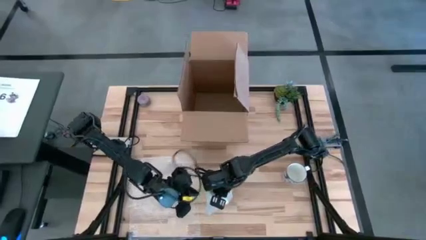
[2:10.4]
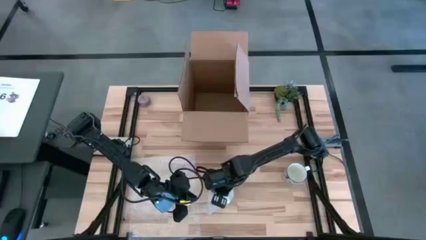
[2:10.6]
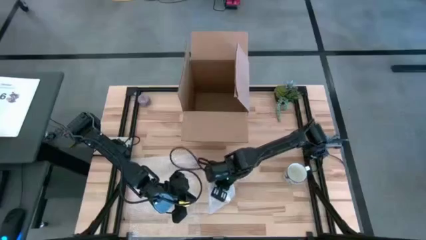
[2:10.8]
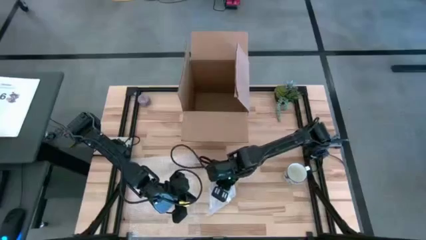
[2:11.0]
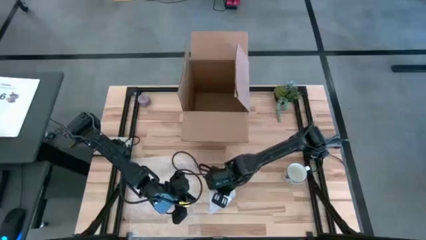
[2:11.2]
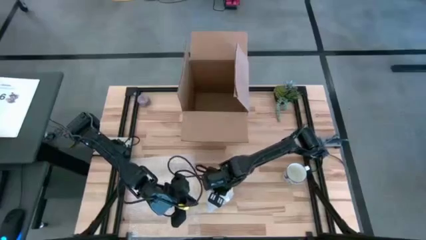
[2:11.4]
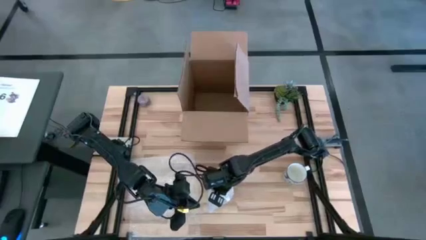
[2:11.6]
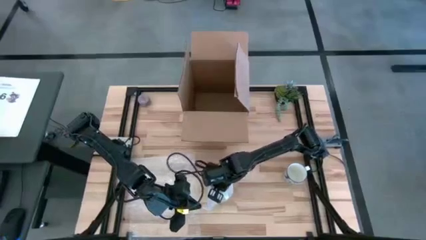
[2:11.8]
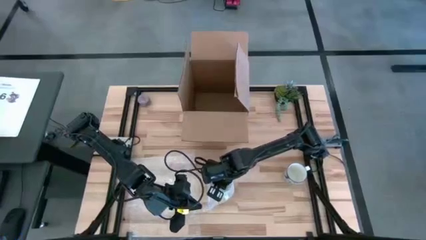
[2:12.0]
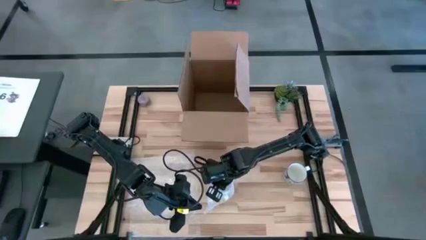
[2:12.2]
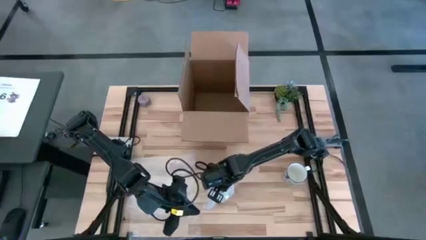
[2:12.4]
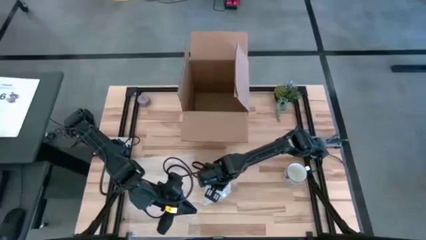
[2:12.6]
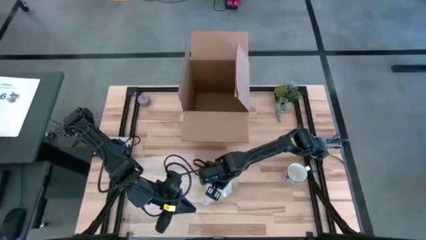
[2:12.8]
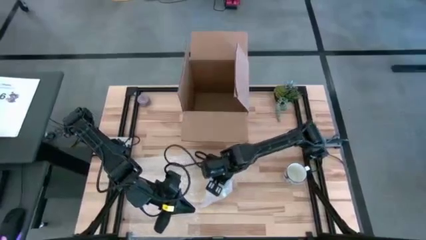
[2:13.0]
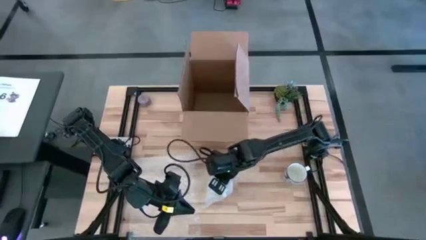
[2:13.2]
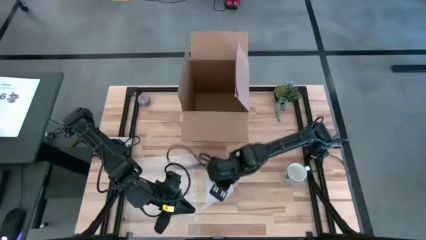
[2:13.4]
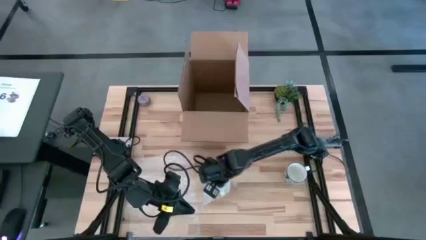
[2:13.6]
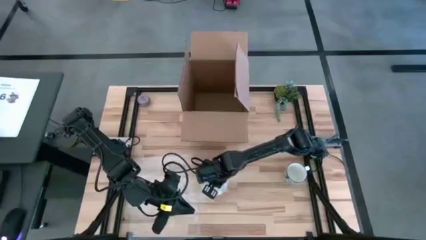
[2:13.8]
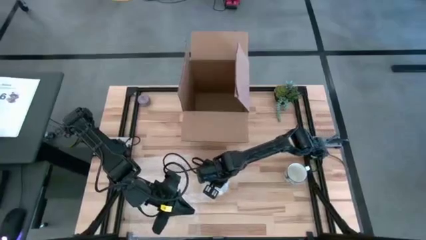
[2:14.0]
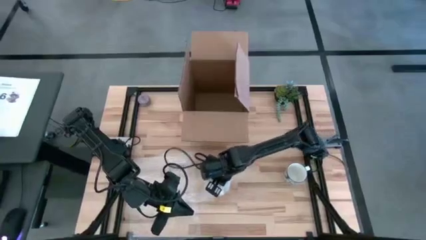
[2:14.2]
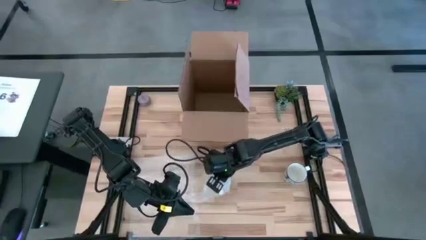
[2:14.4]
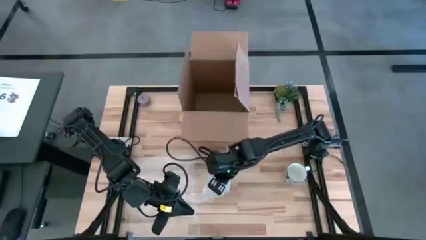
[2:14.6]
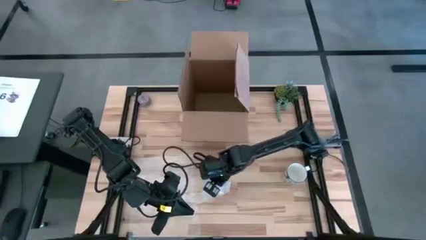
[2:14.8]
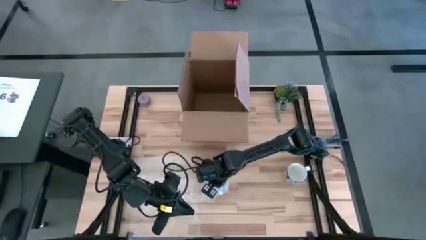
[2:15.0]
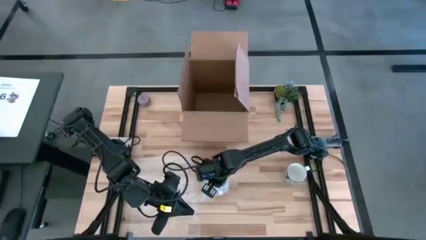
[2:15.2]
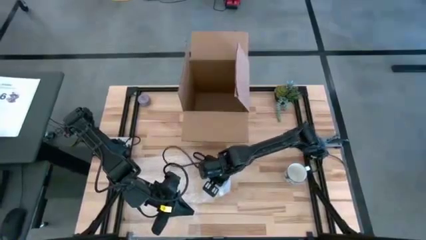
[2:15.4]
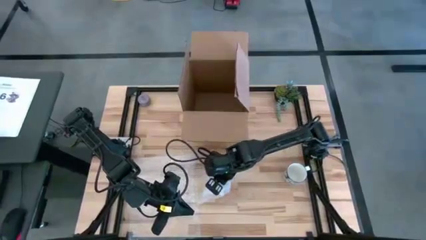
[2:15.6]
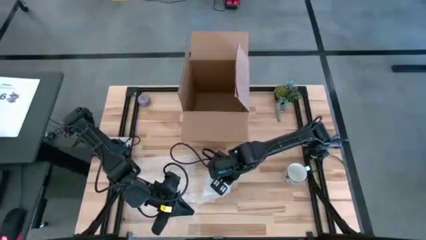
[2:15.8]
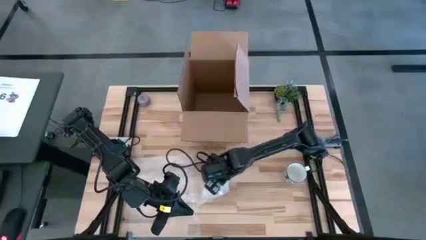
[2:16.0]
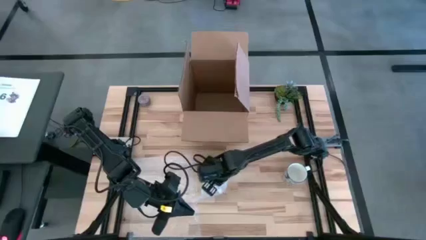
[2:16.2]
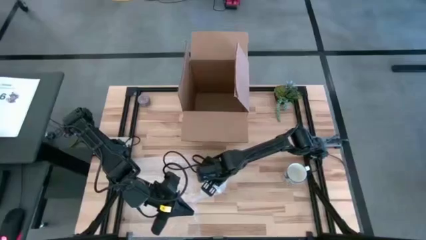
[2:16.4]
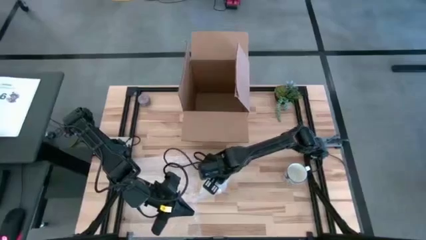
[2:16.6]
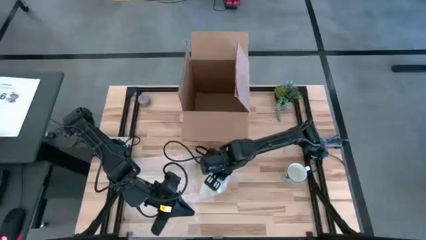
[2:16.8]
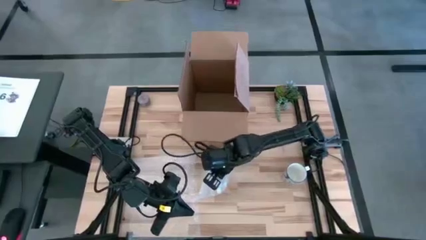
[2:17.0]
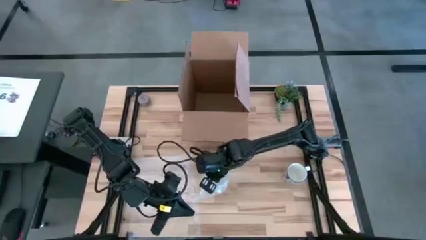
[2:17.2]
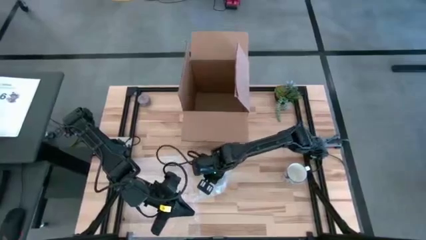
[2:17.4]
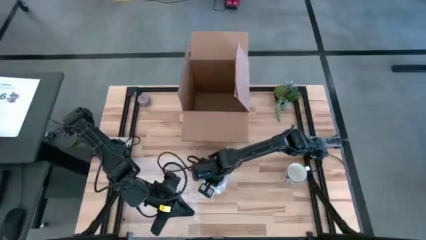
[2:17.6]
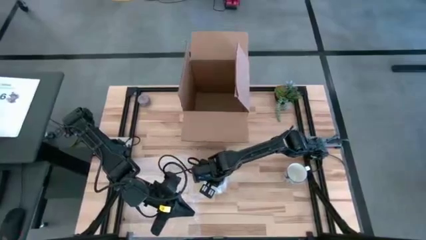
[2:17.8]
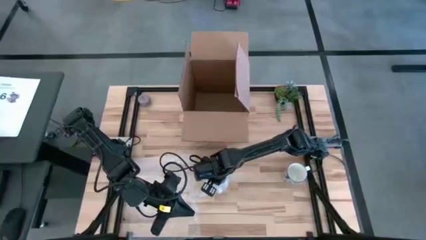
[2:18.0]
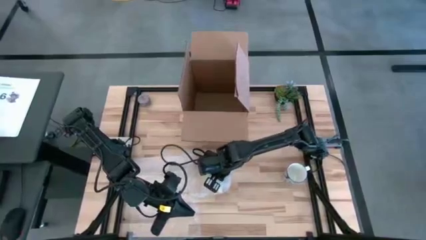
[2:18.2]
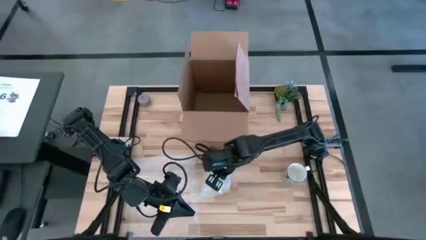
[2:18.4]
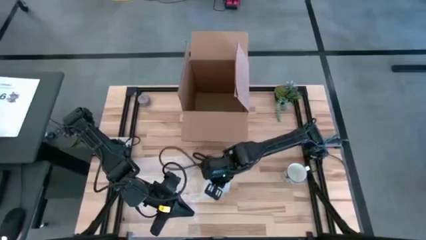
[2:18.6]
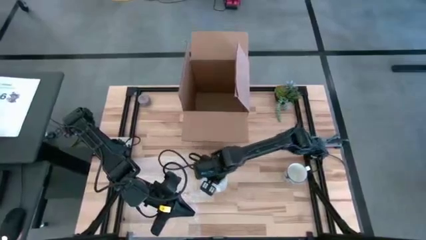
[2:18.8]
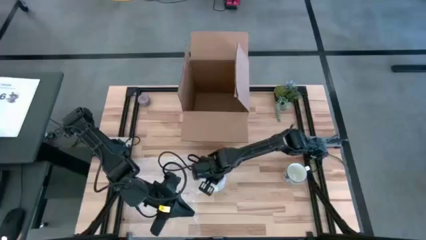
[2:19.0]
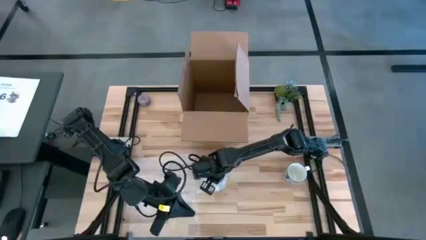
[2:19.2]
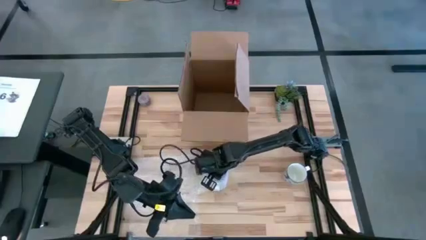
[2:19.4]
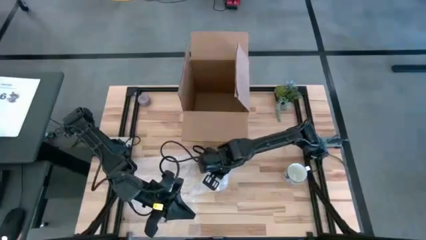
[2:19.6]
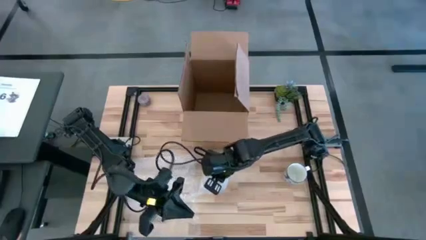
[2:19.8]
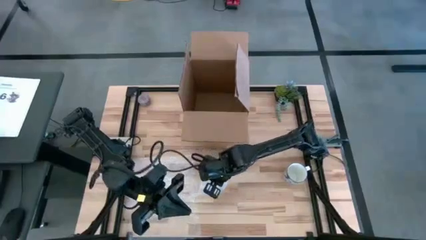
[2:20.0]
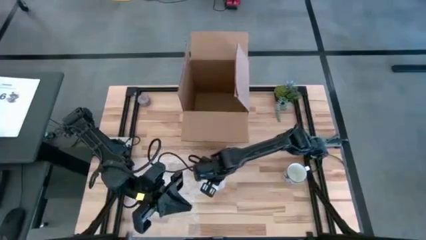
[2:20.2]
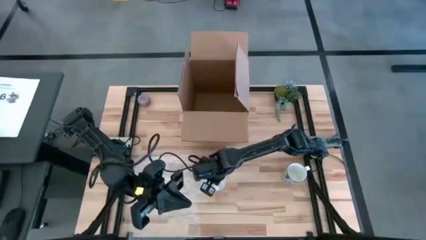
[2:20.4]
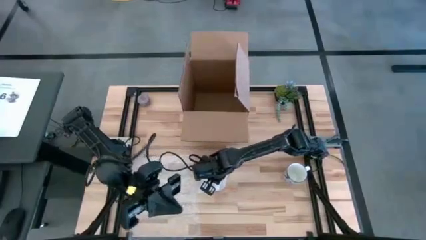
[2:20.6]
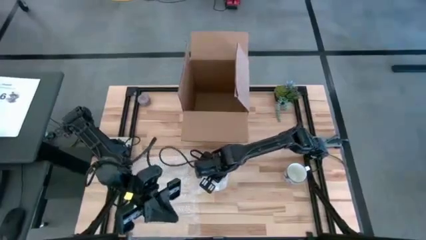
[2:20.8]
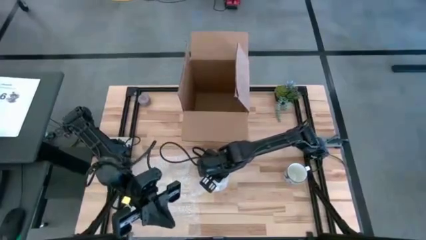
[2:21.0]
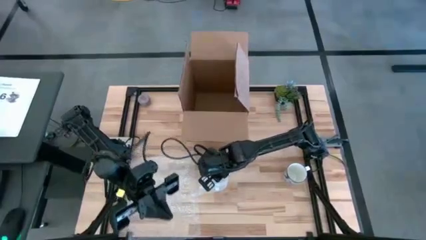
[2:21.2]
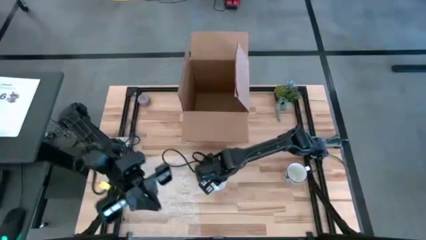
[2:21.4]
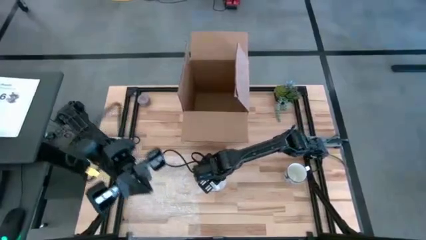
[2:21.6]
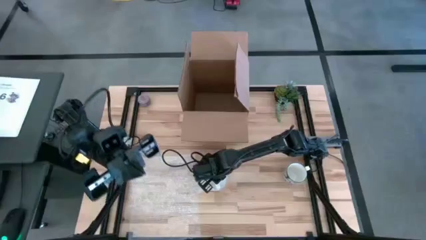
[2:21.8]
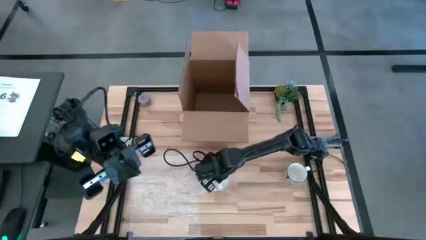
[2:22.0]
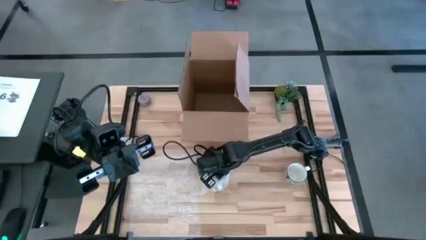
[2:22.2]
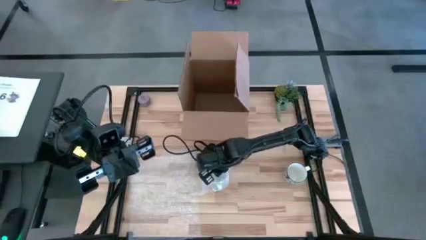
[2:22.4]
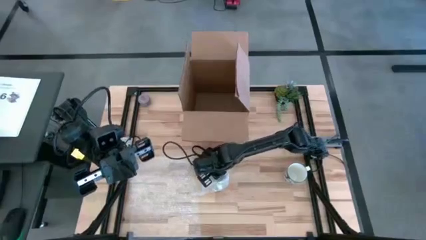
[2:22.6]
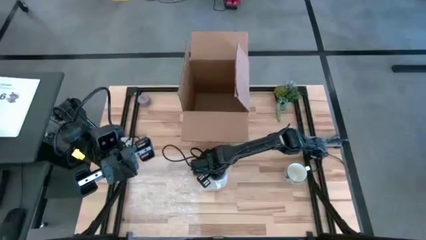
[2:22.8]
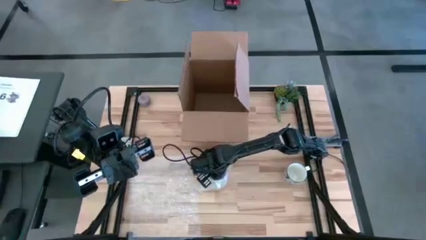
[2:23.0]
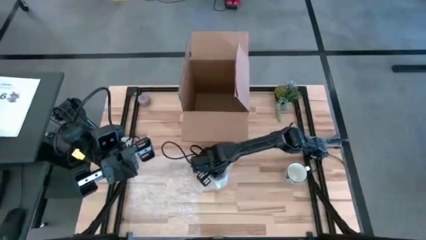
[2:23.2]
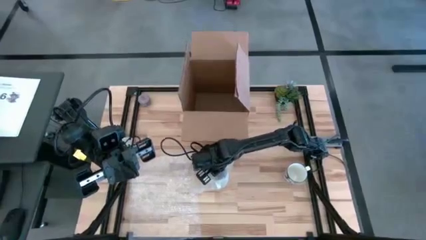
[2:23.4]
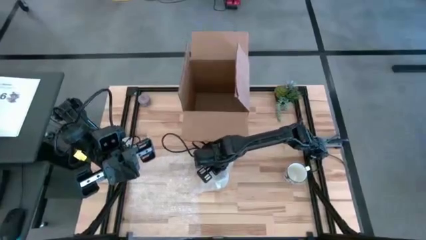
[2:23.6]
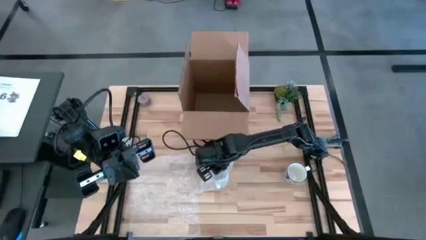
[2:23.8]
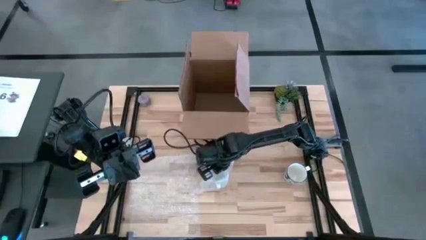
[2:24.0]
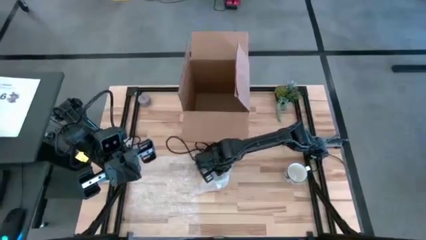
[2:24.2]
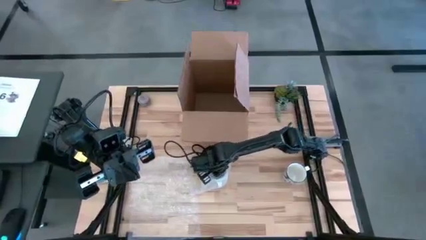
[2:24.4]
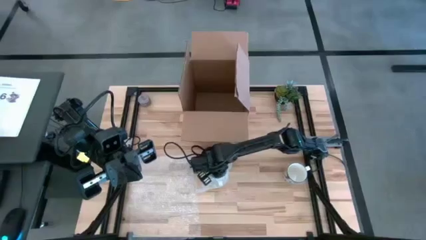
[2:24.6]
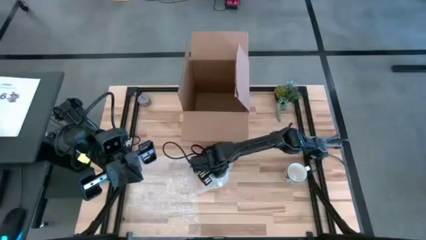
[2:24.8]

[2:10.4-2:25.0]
Task: wrap mug
Wrap the blue patterned mug with the right transparent bubble wrap

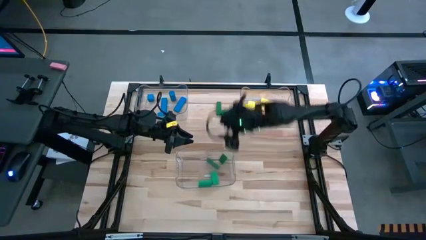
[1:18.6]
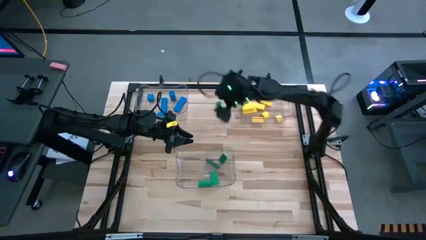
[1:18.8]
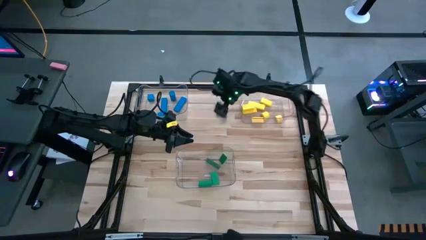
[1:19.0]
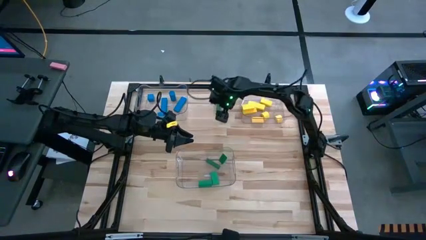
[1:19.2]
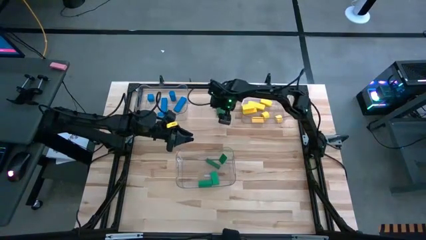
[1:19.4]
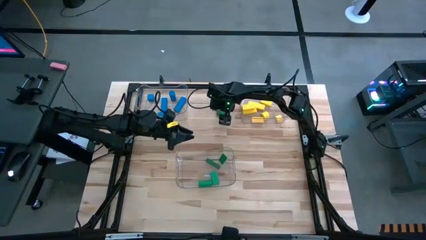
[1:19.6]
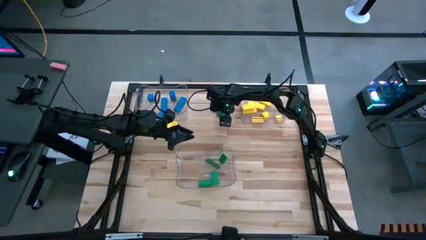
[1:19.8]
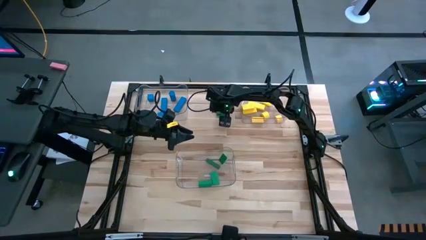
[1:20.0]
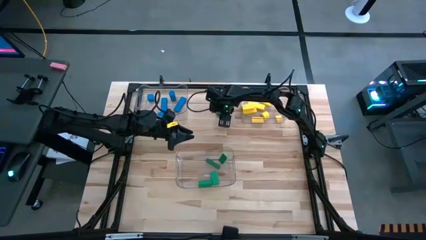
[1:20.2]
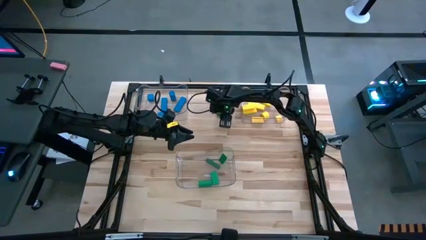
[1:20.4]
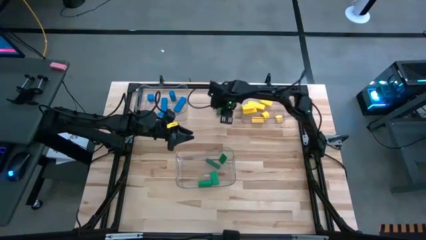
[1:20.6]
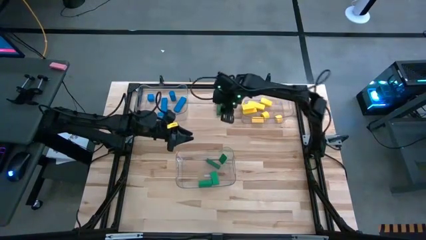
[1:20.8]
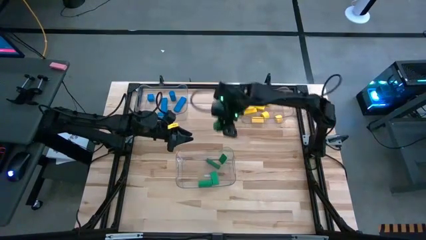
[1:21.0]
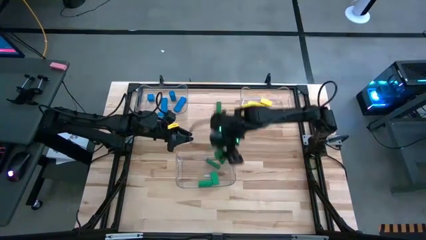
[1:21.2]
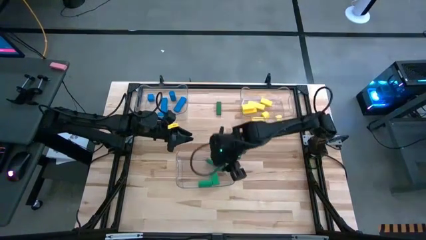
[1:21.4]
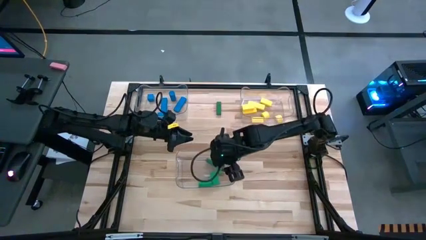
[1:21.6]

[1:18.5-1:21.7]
Task: Sort blocks
Put the green block into the bottom transparent bin
